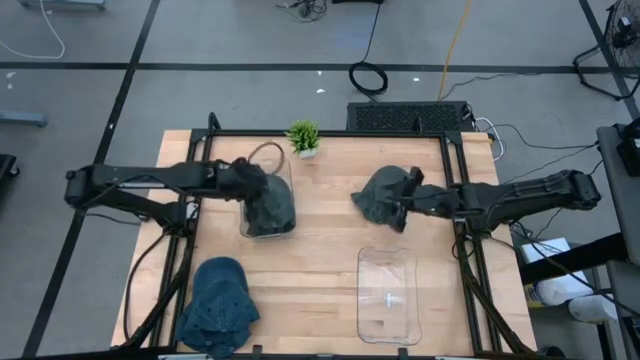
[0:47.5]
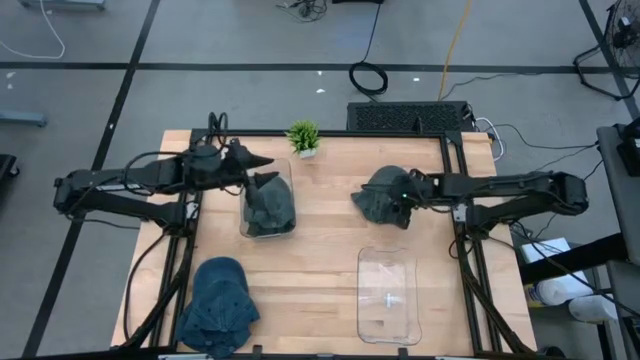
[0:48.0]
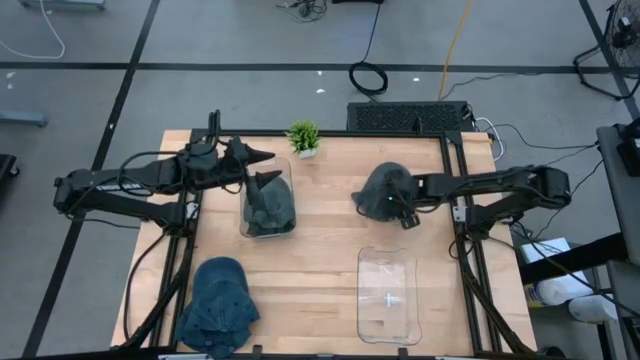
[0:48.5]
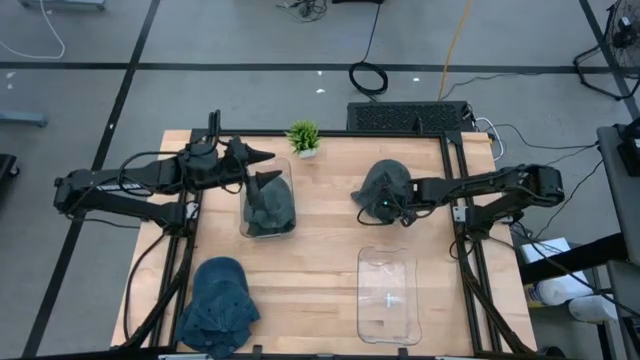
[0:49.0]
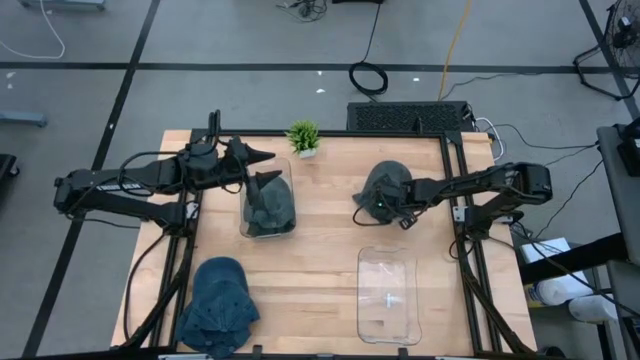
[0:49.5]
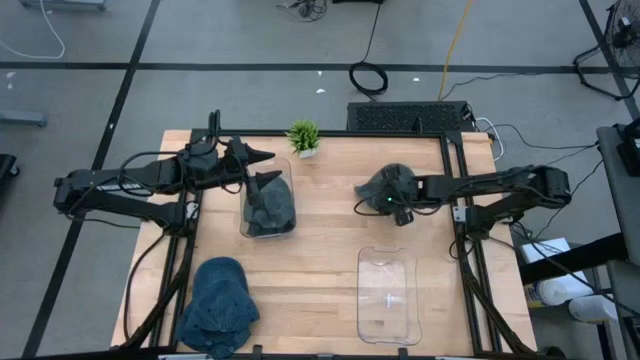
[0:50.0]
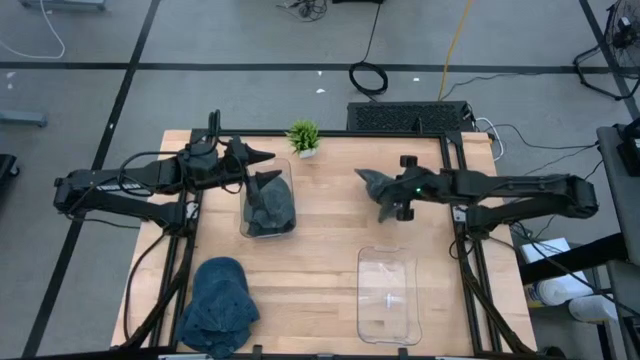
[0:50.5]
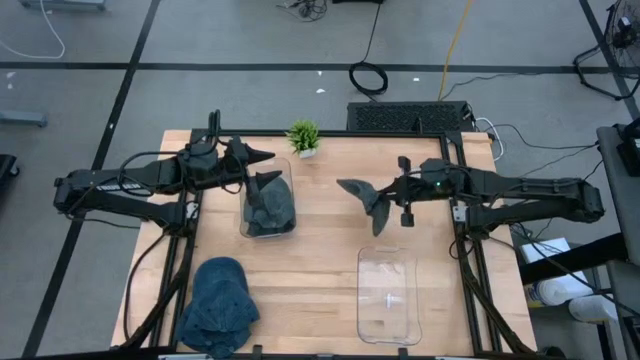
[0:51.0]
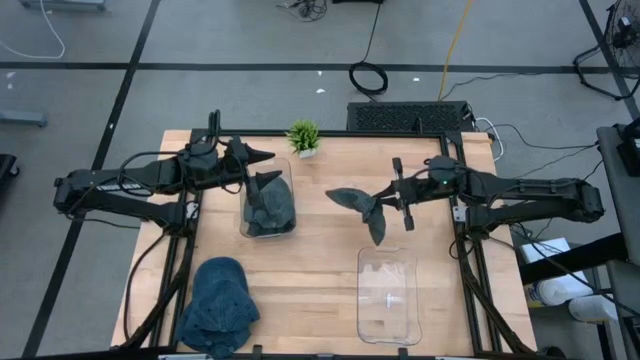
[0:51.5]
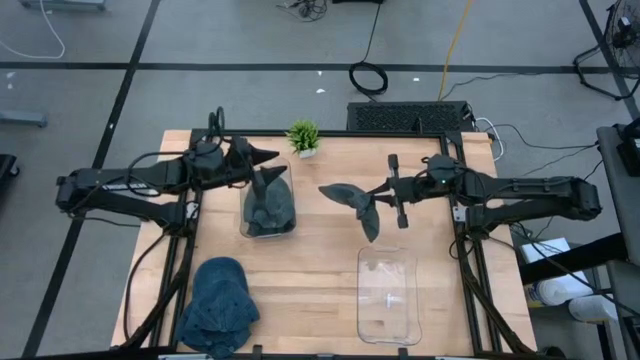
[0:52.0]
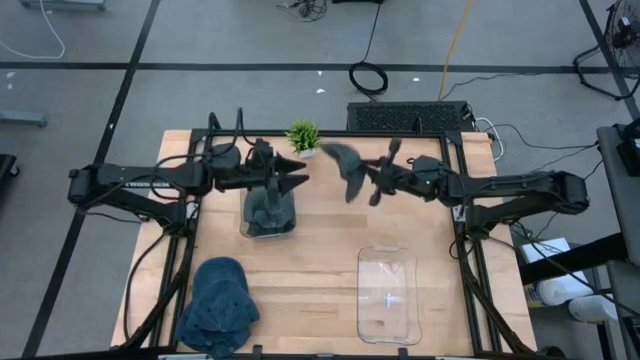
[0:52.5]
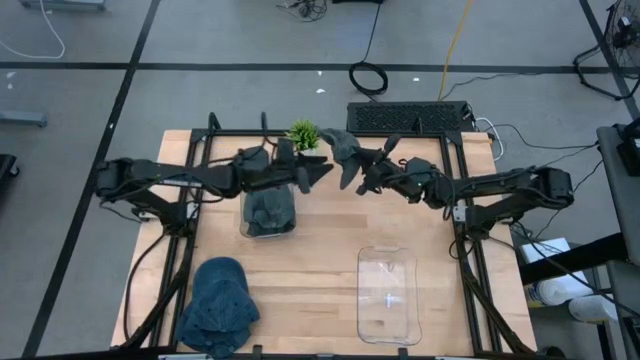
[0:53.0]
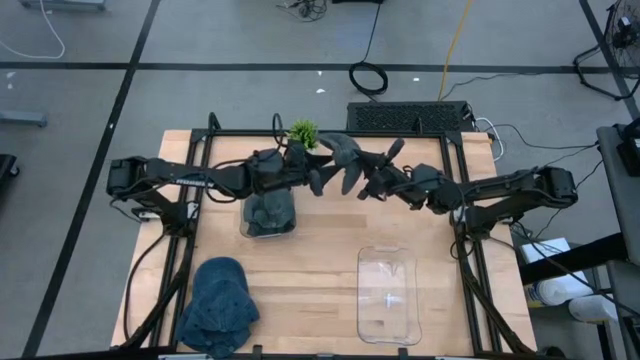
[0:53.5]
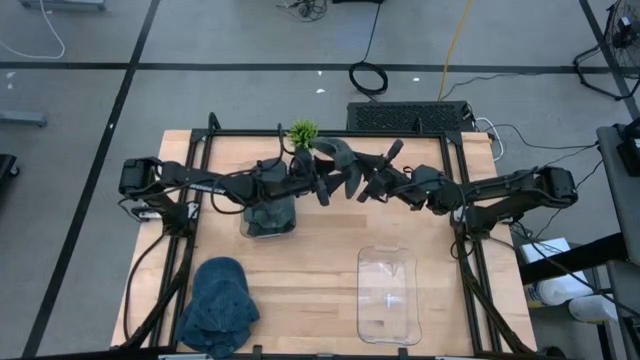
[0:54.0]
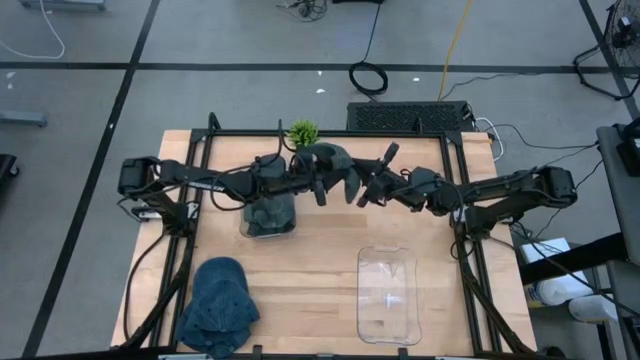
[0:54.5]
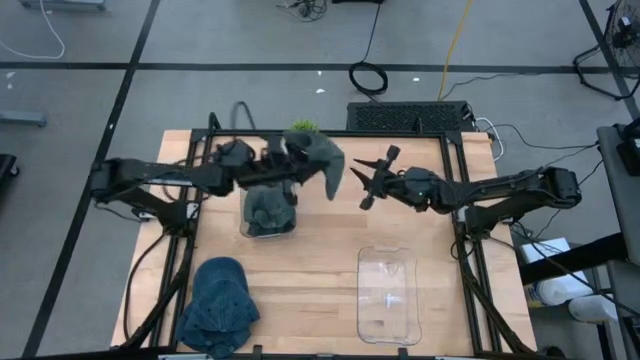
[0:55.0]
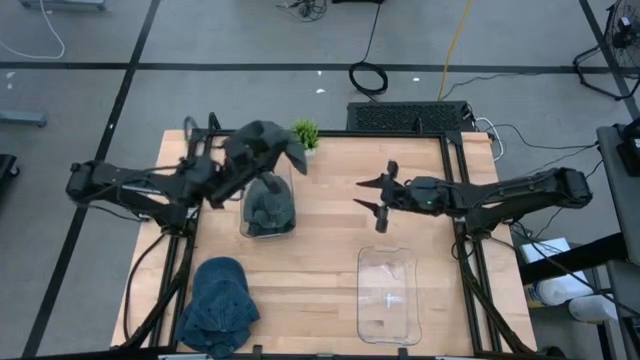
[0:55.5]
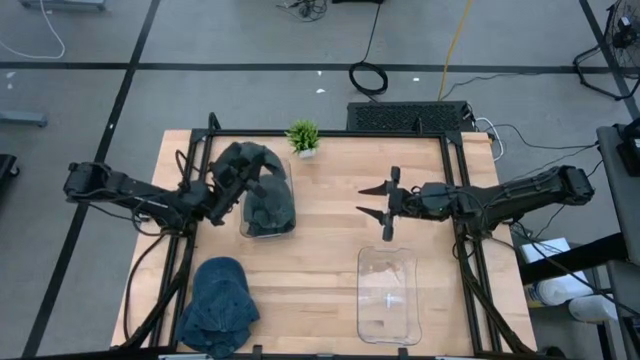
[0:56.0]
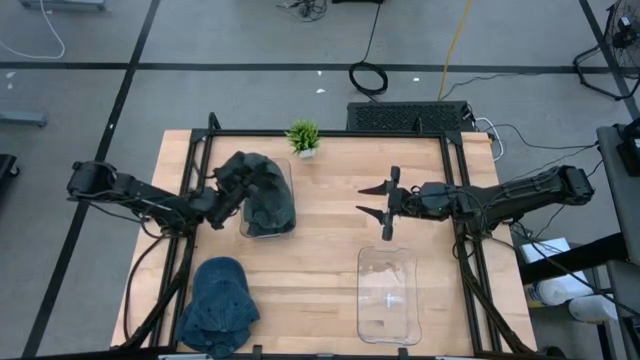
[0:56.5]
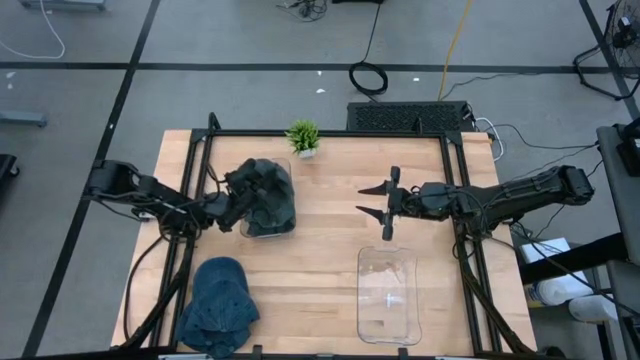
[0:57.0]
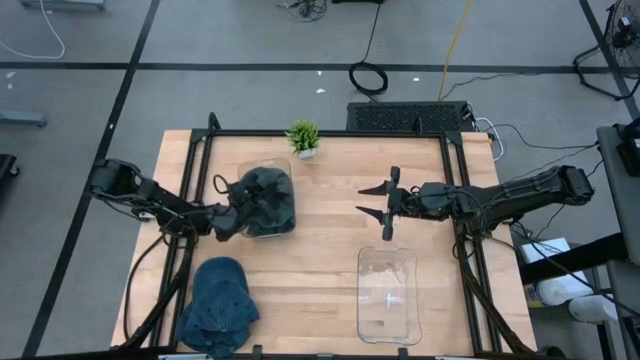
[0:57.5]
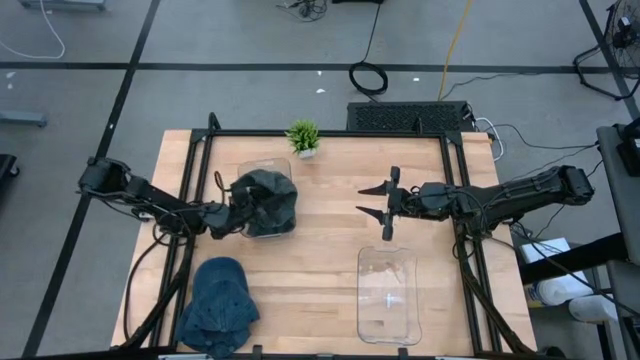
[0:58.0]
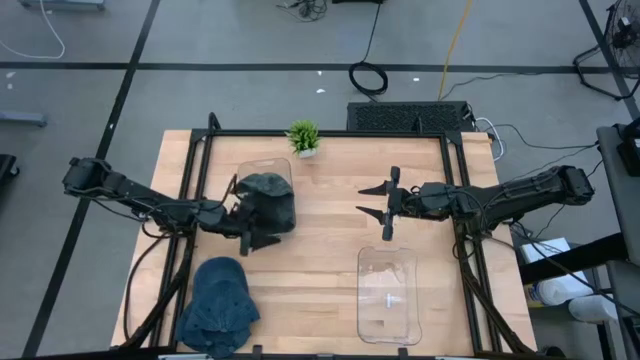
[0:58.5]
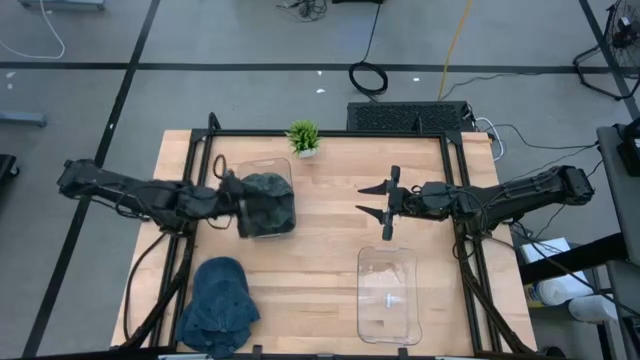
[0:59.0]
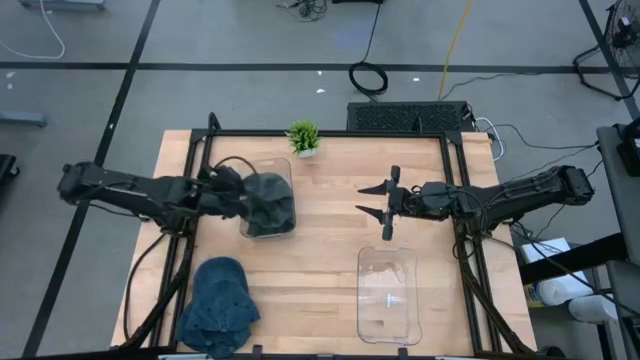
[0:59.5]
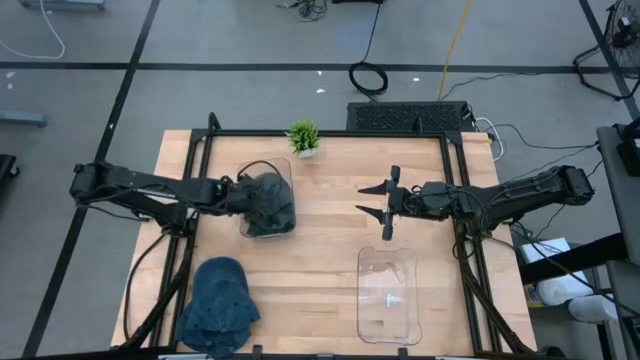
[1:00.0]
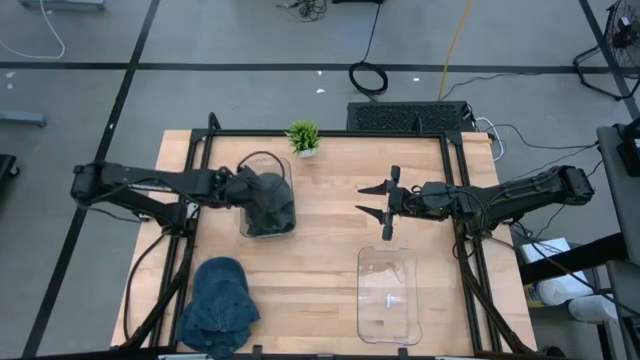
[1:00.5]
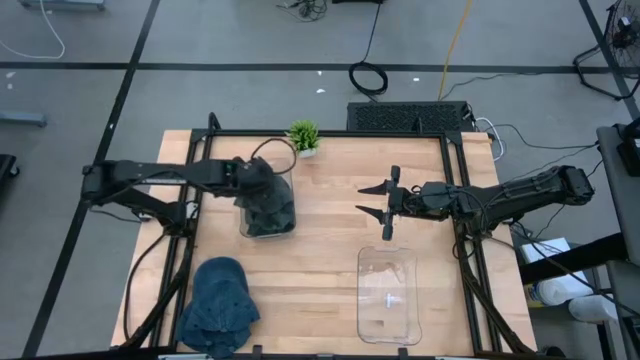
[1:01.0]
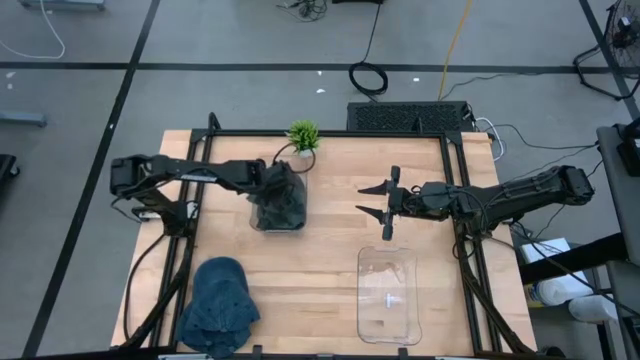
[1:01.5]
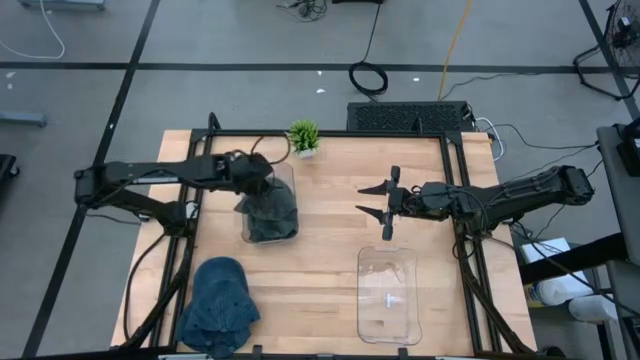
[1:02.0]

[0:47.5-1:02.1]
Task: Pick & Place hat
Put the black cap into the top transparent bin

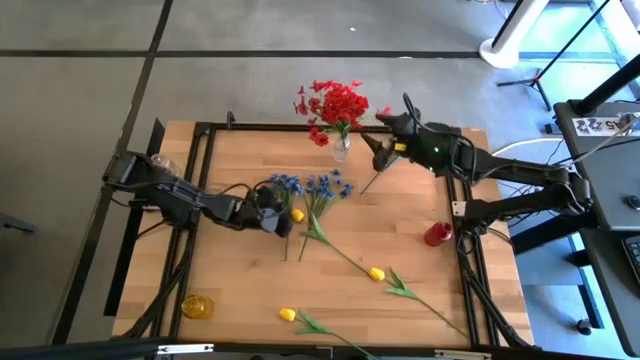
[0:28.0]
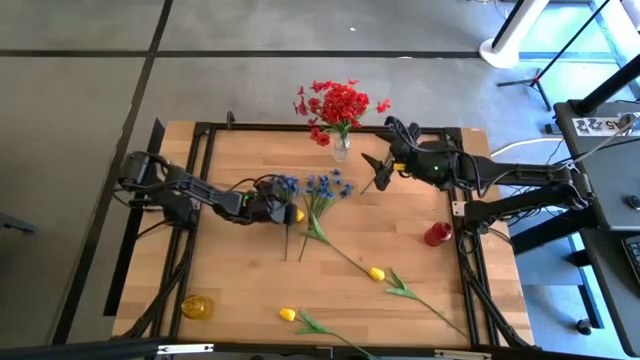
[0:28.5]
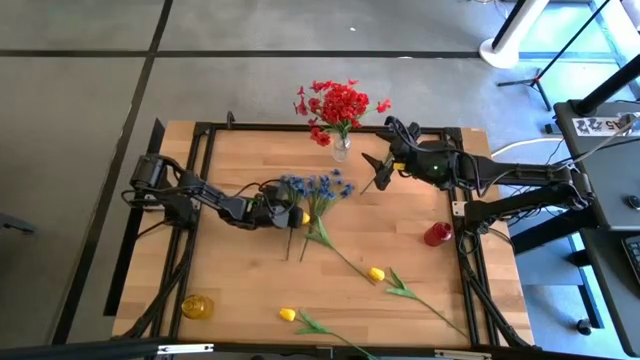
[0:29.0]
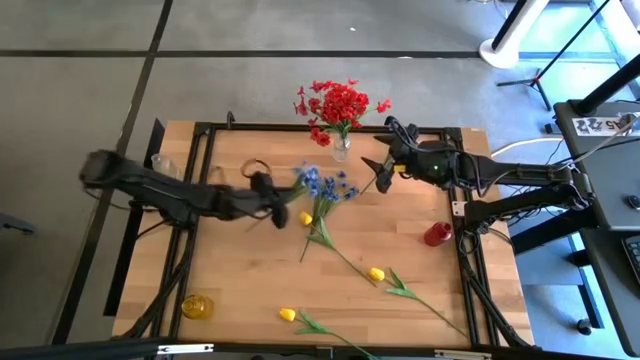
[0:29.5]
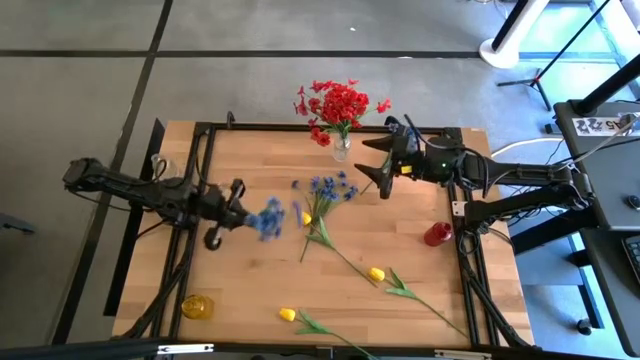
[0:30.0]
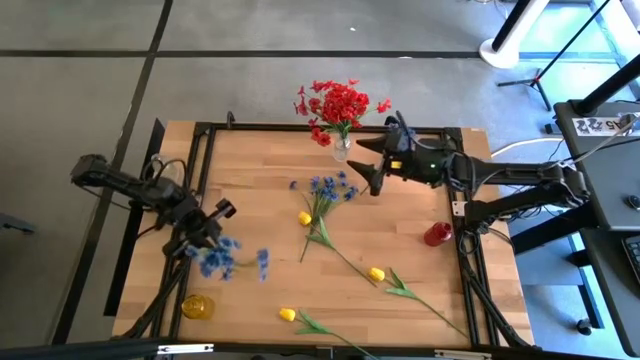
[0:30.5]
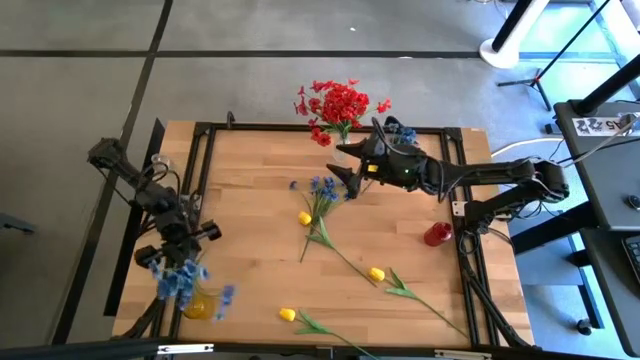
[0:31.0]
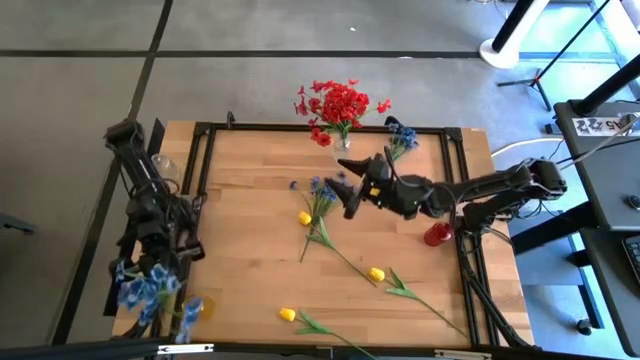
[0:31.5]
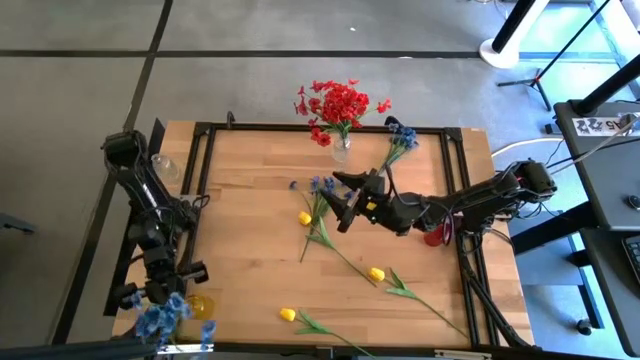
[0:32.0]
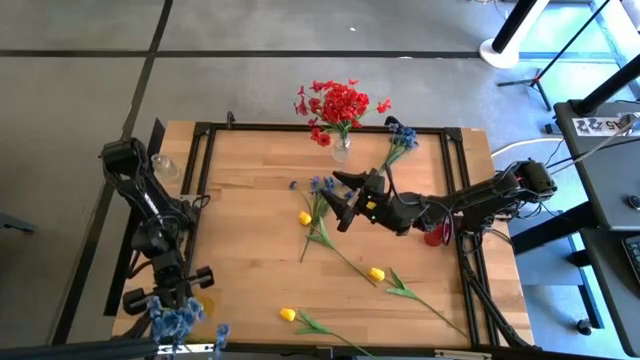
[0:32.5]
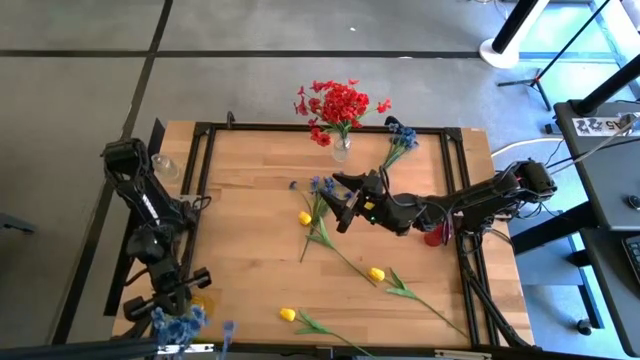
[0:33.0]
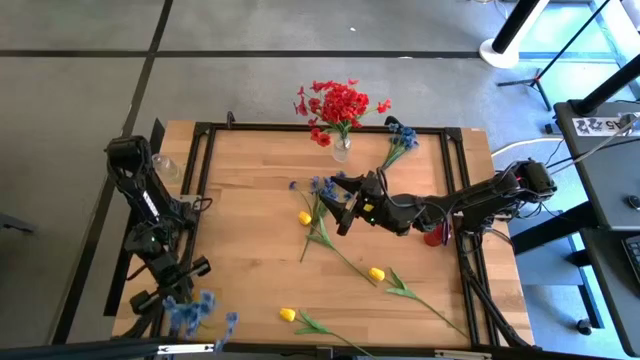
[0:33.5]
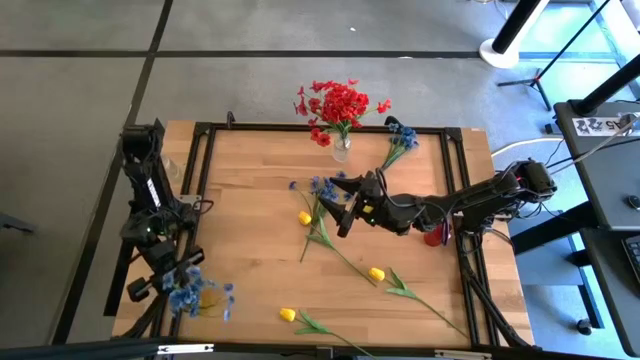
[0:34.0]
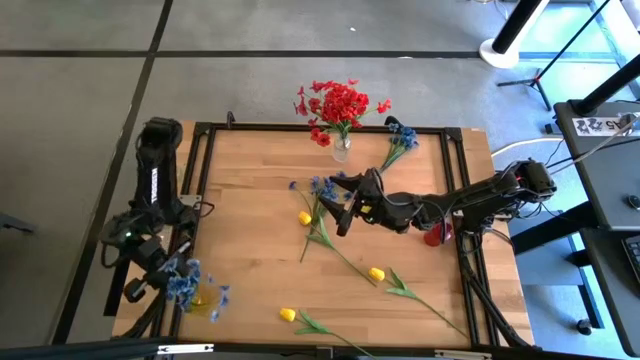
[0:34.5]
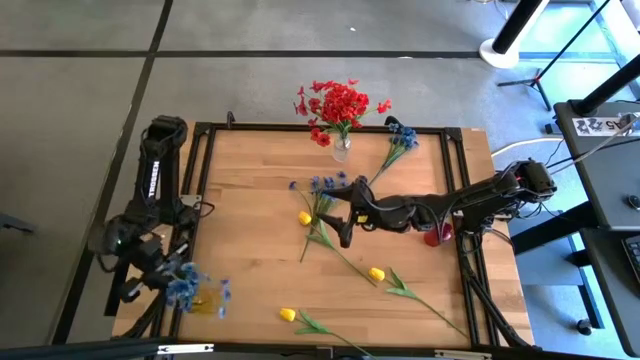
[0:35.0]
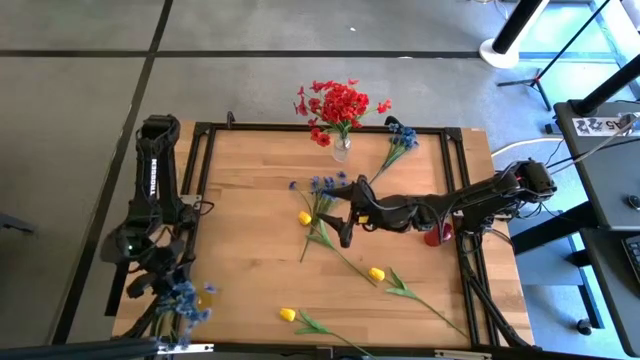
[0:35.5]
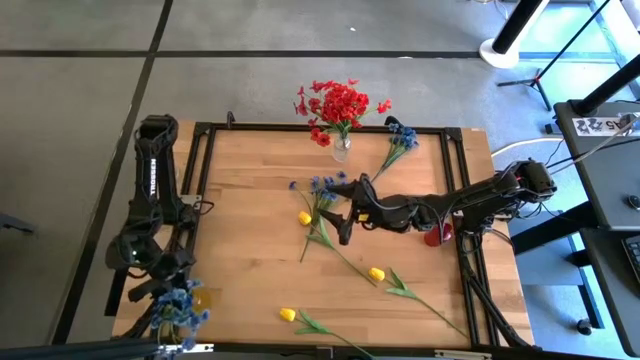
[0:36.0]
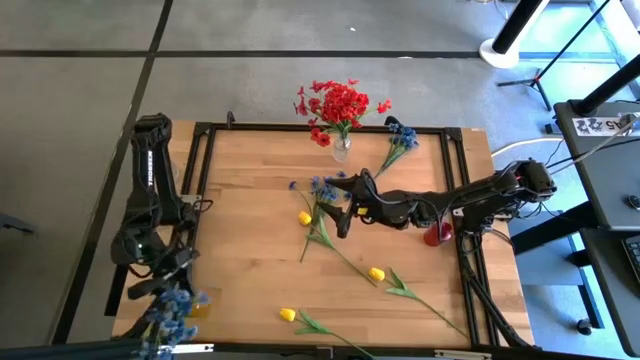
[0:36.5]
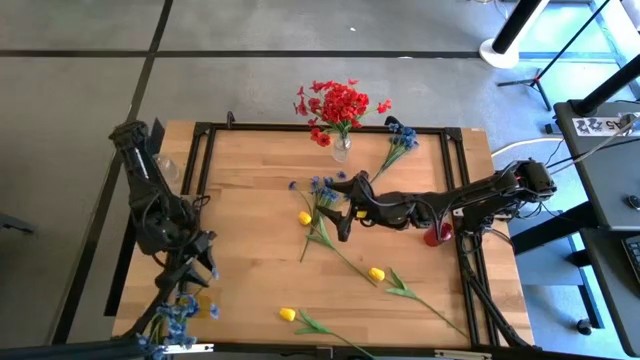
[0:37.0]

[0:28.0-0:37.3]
Task: Sort flowers into vase by color
Put the bottom left blue flower into the yellow vase
